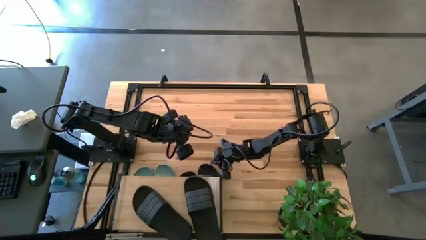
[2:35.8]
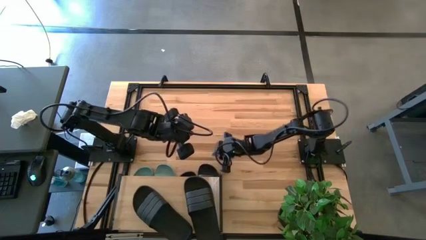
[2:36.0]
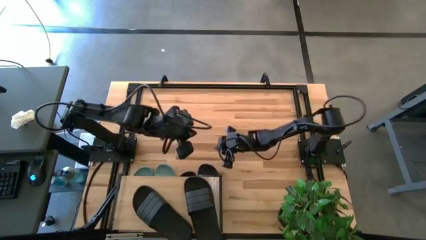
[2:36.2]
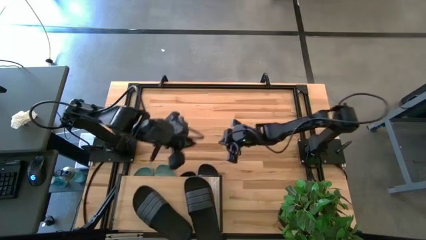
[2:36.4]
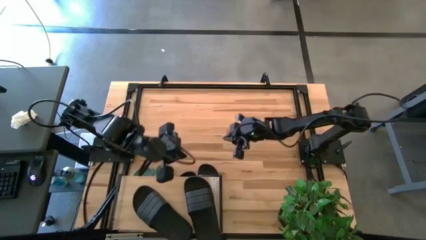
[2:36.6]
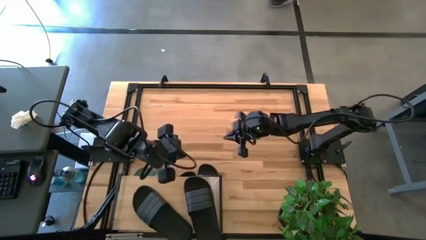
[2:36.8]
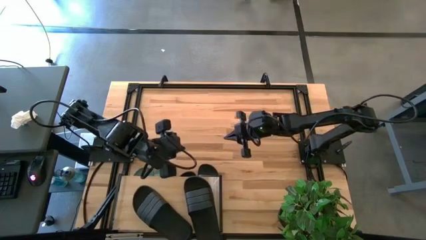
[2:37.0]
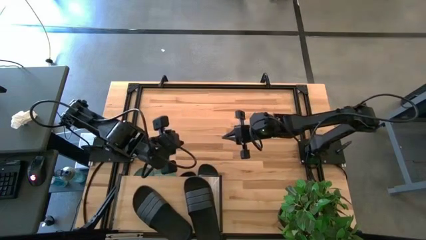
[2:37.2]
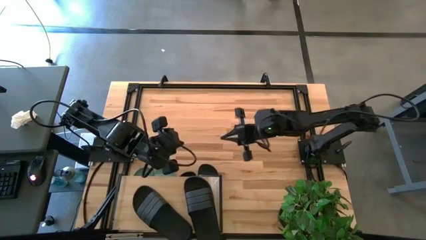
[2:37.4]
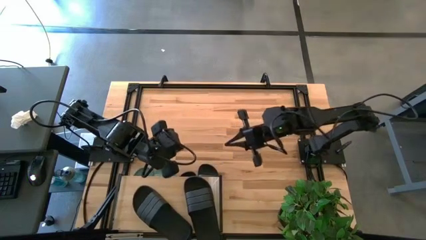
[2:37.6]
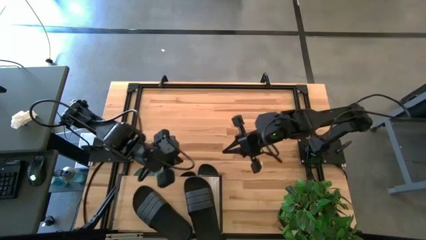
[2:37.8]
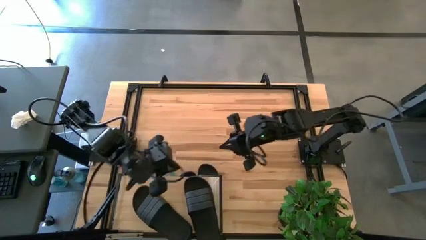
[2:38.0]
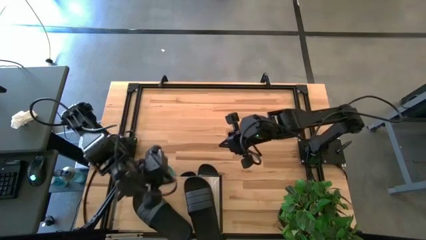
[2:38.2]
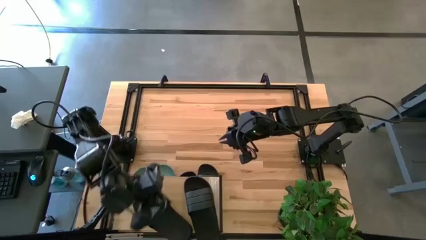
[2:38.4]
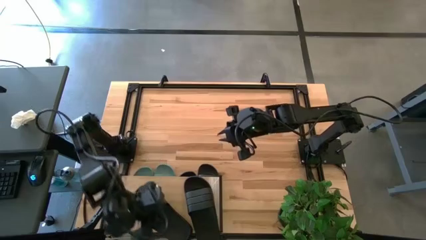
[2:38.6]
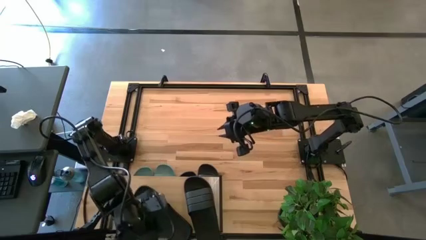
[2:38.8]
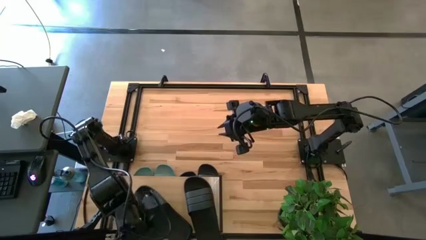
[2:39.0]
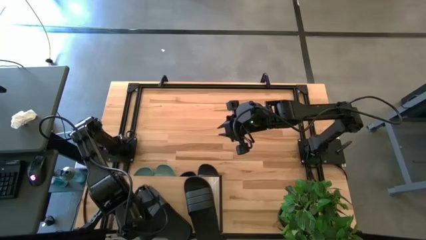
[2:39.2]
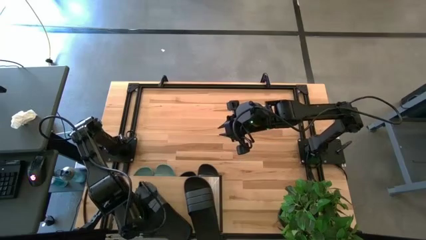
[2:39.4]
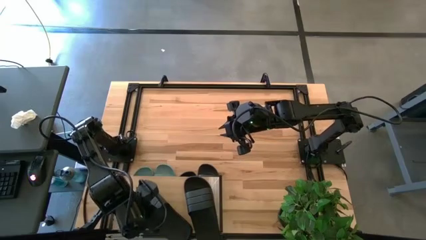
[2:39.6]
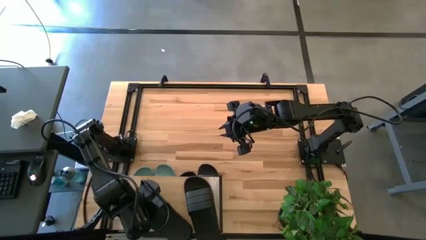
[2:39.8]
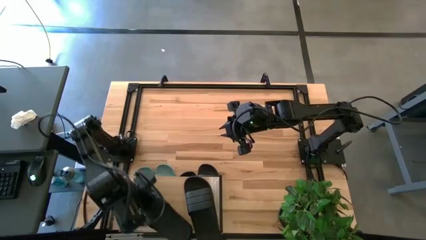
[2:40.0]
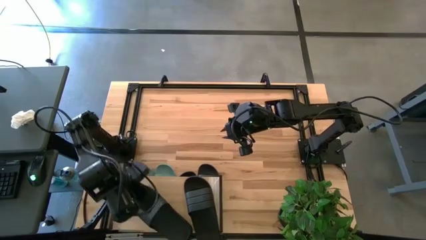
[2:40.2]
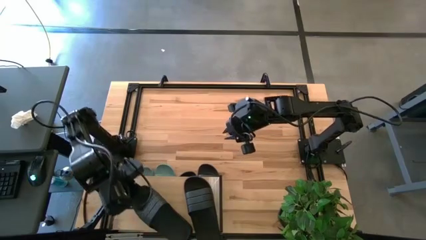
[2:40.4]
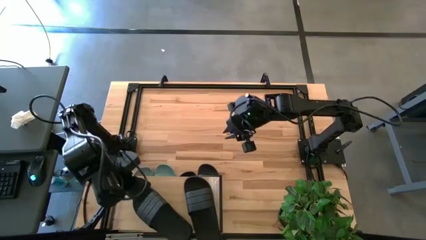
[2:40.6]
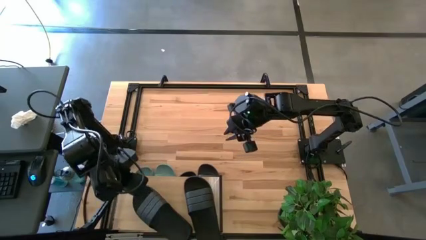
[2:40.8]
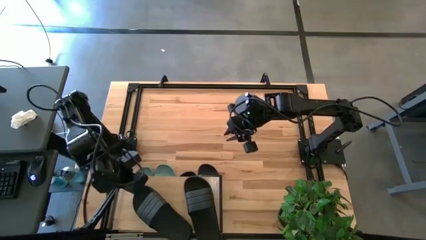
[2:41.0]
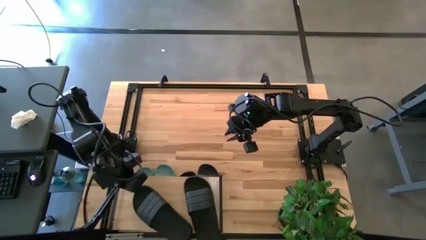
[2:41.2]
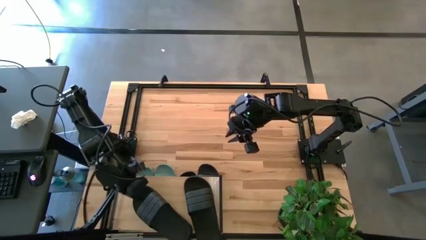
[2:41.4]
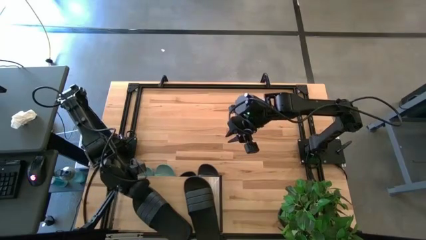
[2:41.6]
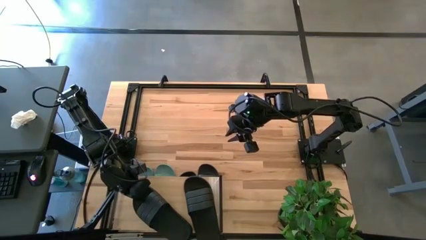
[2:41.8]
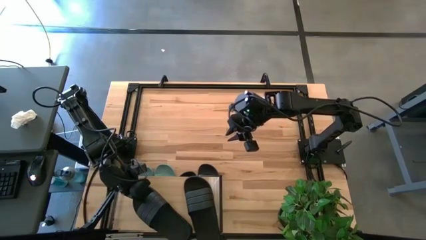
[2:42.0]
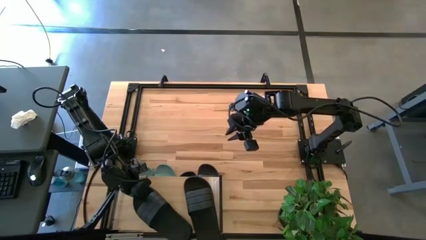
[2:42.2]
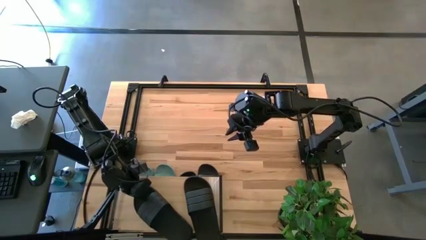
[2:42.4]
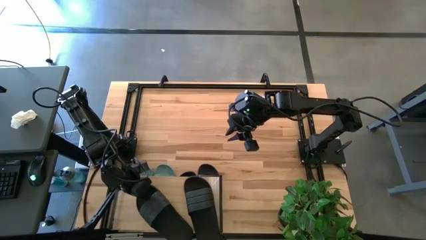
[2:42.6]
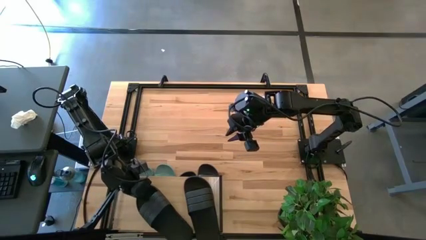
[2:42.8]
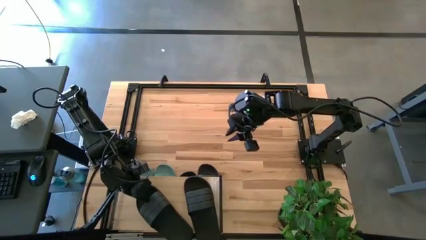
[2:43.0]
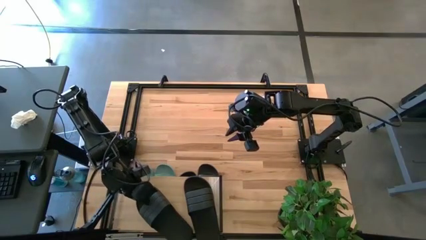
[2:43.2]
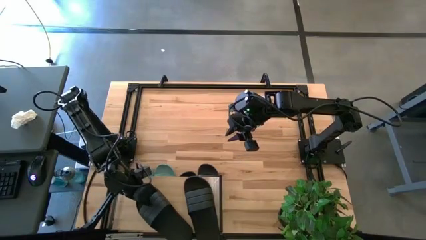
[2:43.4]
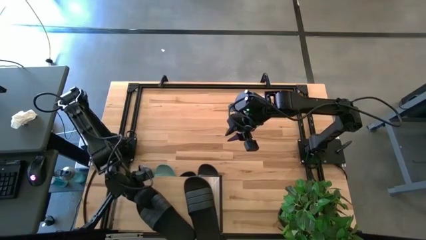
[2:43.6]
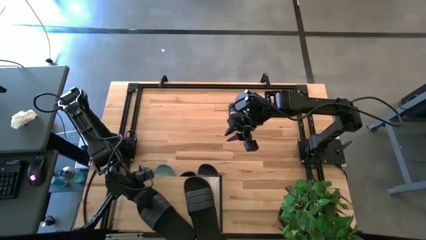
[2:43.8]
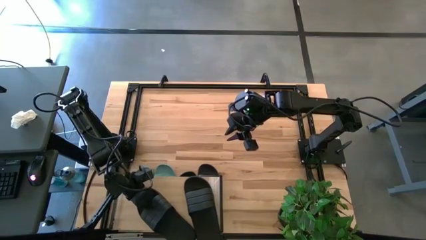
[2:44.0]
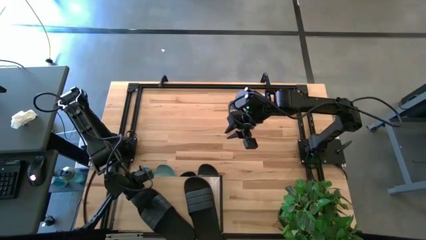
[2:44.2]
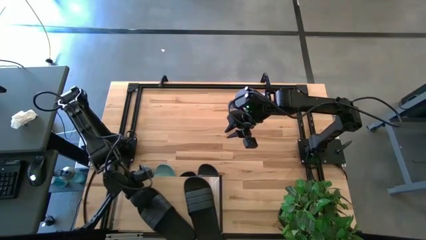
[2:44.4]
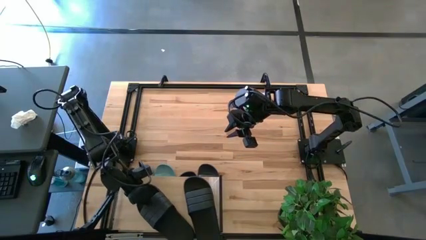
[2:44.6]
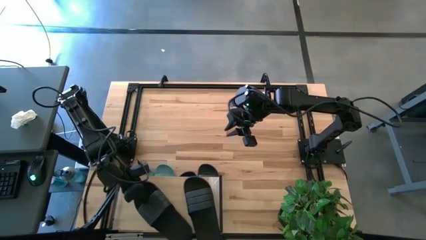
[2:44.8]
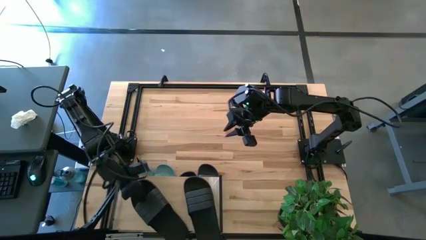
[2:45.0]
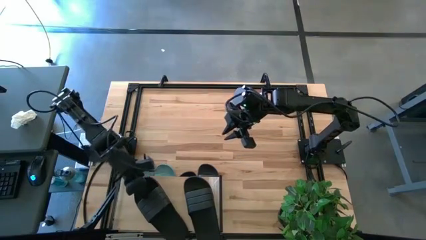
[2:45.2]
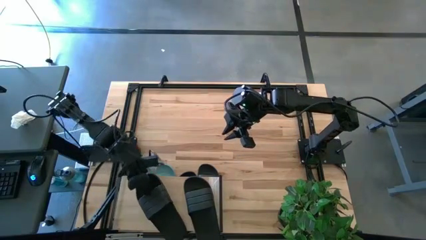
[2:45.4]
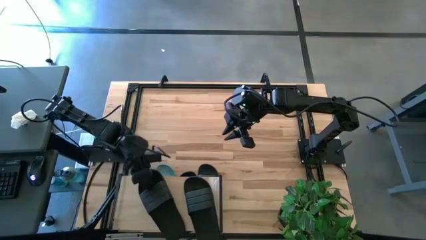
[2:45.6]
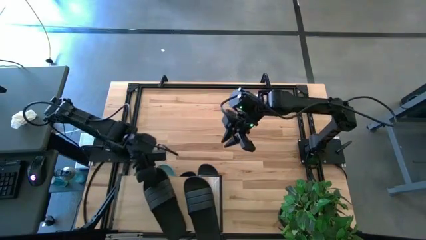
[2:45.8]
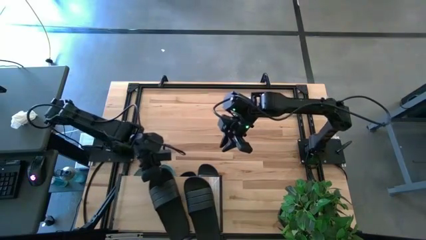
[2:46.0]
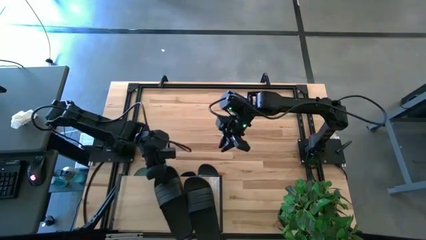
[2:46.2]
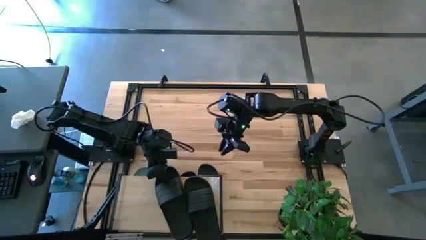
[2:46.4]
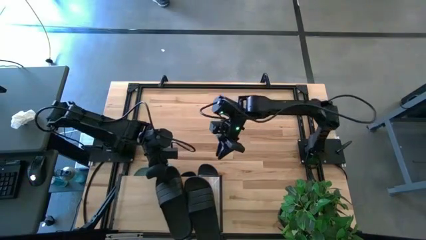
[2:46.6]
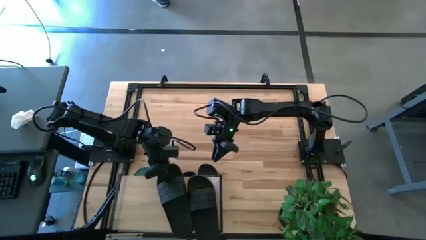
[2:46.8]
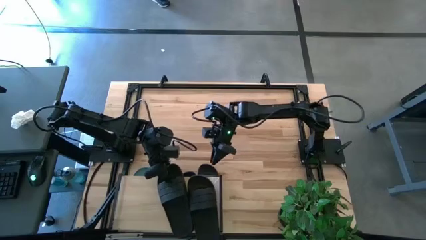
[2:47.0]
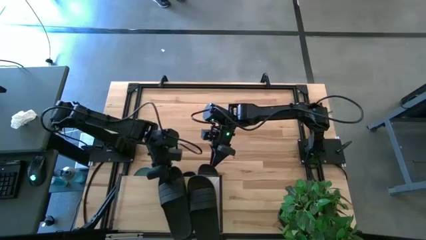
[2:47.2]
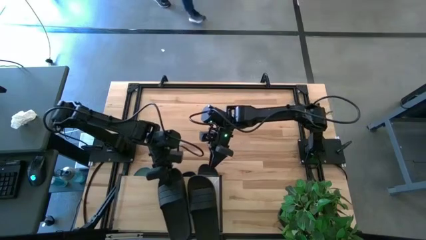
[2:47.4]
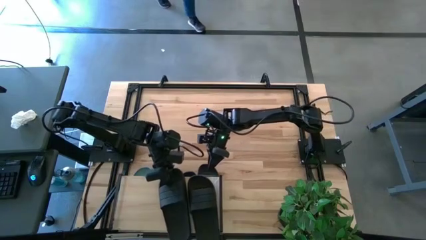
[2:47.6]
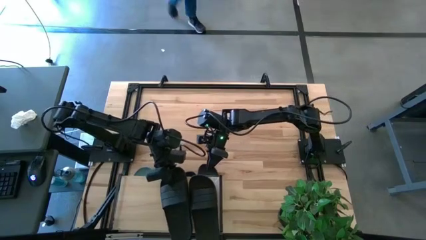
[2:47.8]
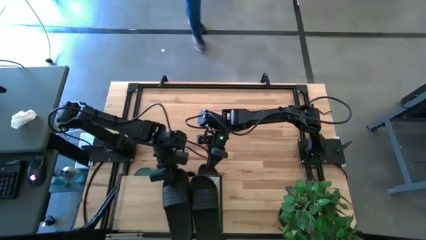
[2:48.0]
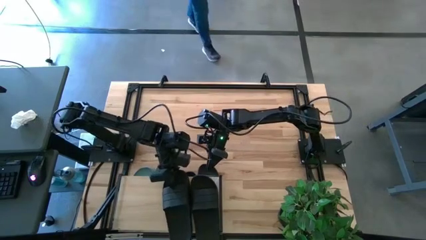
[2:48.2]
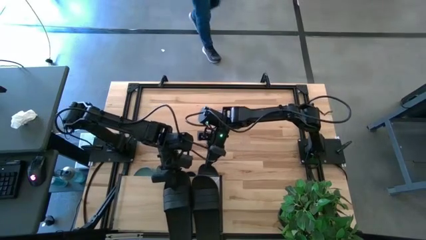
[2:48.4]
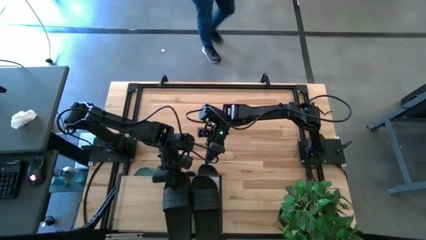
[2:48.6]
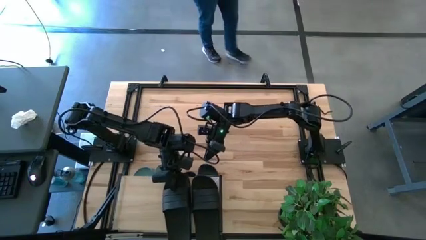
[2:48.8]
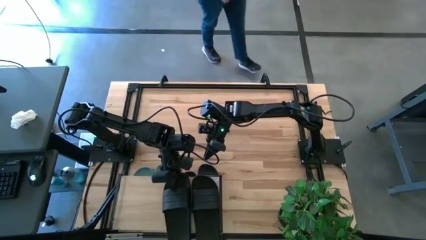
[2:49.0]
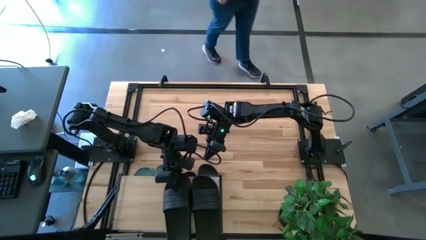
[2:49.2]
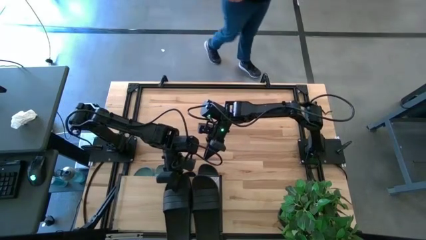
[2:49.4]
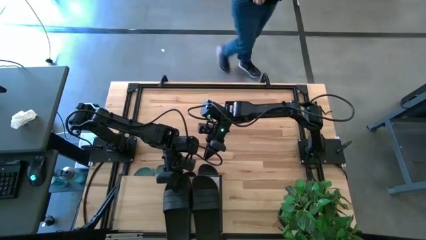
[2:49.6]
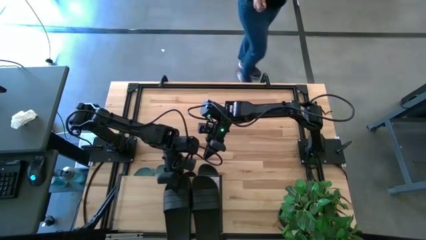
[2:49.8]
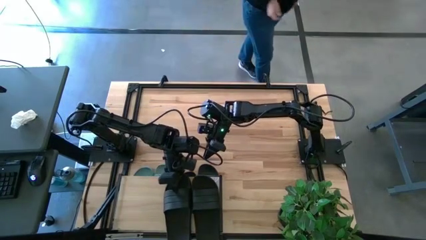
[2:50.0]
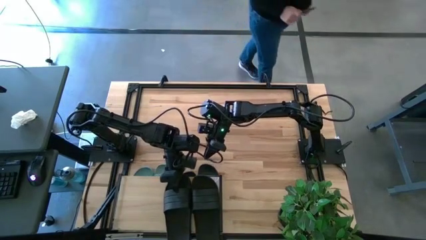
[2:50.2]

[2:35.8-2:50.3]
Task: Pick and place slides into the shelf
Adjust the black slipper on the shelf

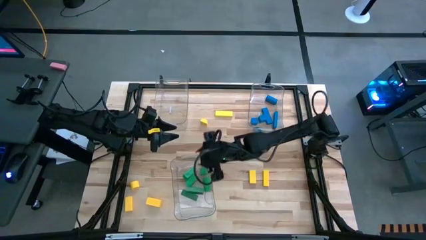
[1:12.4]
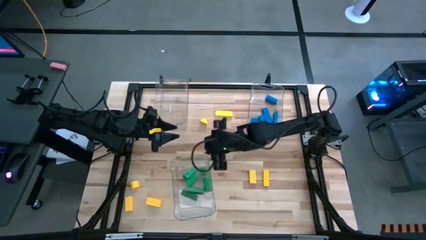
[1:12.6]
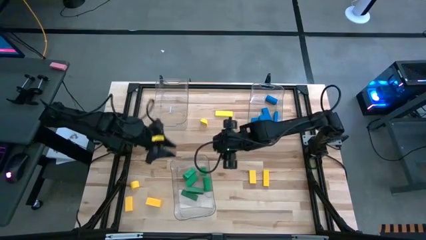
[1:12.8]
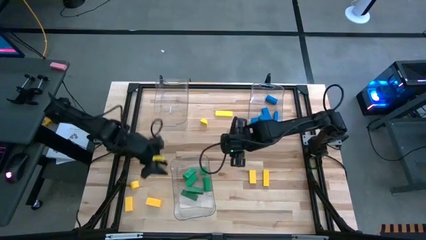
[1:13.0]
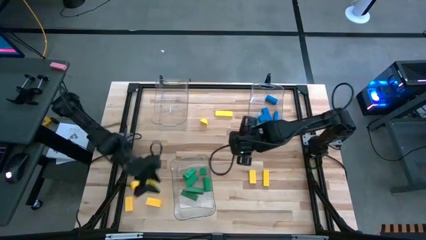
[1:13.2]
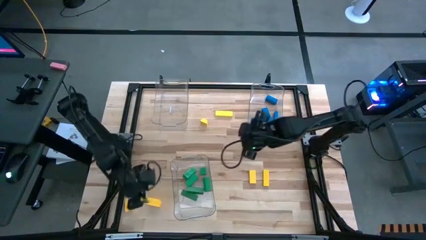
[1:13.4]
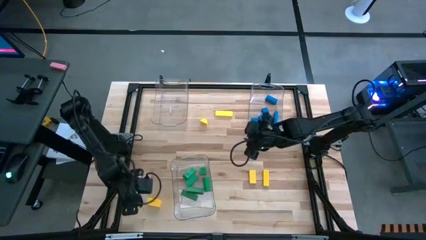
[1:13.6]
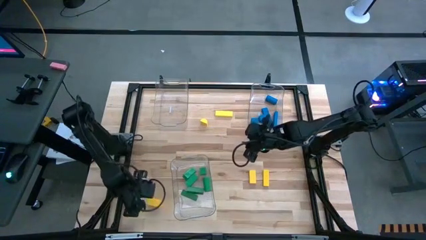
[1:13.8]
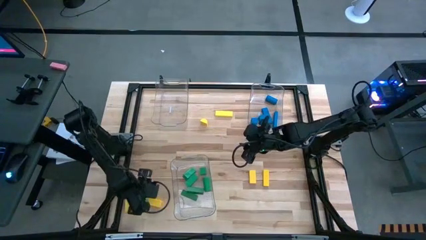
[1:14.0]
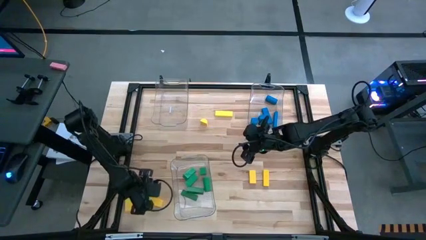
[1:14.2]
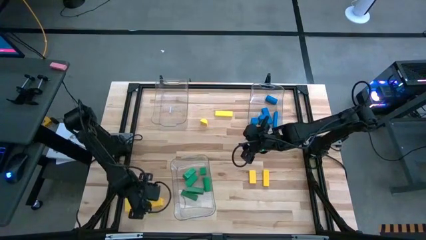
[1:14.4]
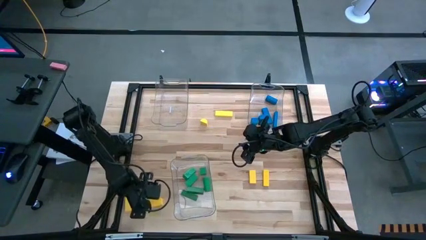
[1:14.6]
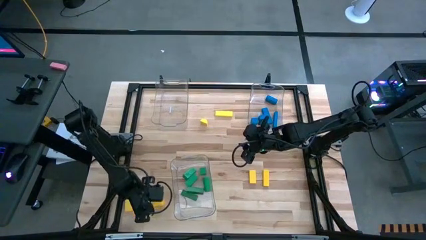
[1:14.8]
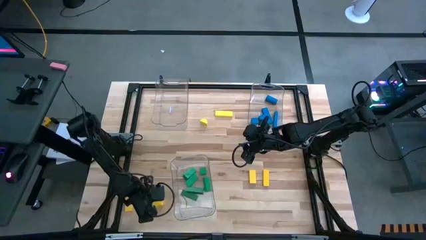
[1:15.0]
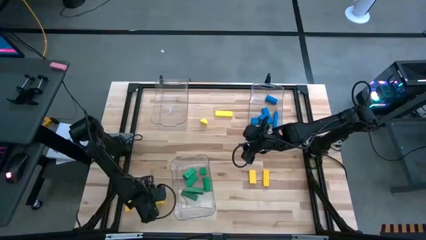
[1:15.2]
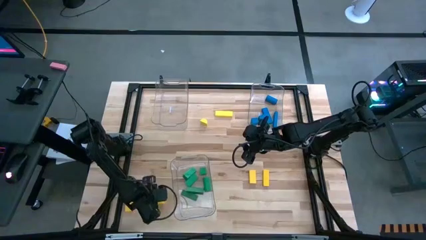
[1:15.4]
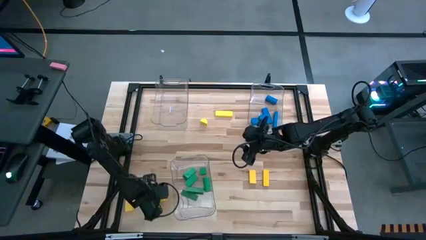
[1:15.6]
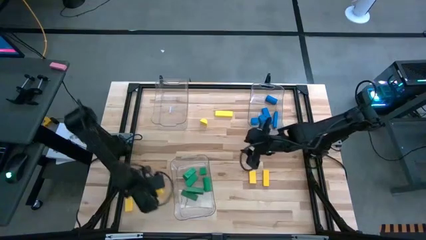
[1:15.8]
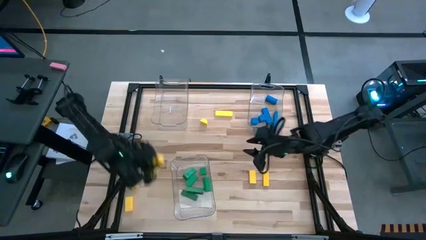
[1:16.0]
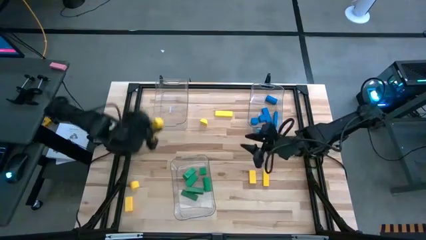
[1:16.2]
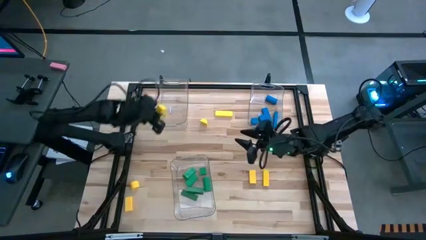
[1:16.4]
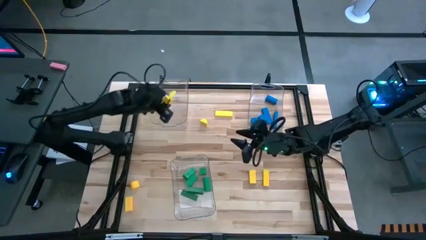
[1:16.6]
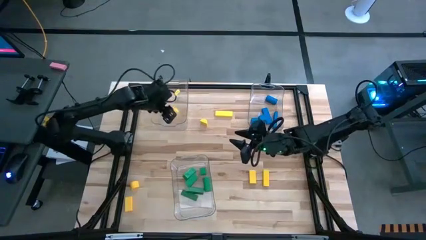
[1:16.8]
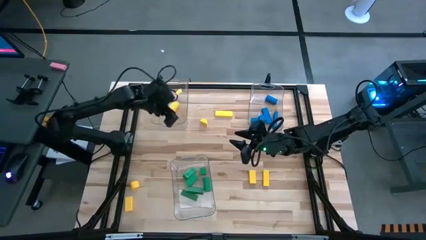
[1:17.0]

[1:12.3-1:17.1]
Task: Sort blocks
Put the yellow block into the top left transparent bin
